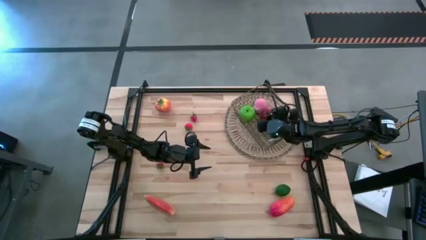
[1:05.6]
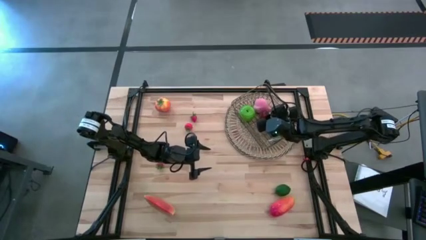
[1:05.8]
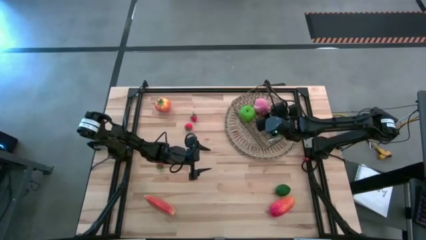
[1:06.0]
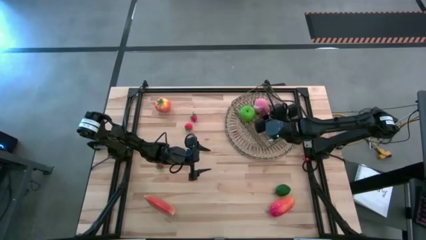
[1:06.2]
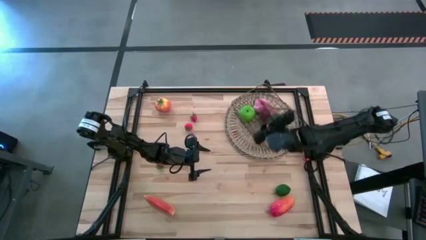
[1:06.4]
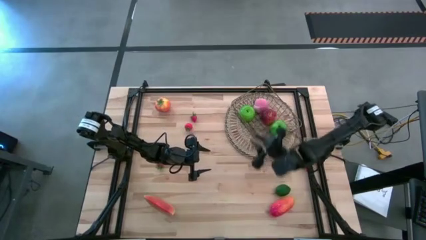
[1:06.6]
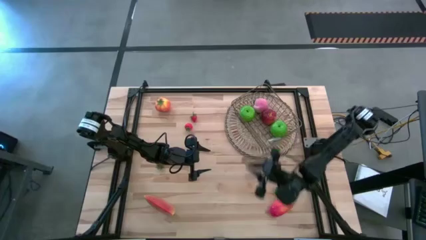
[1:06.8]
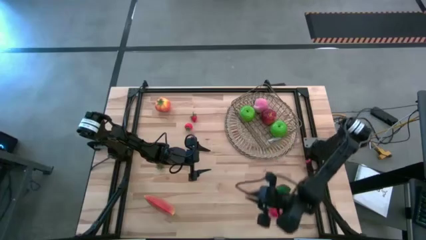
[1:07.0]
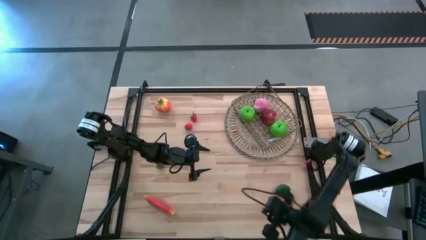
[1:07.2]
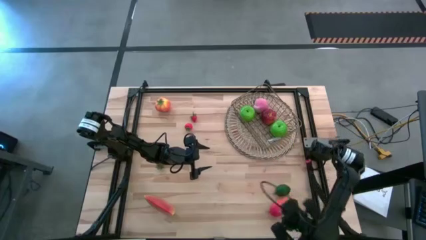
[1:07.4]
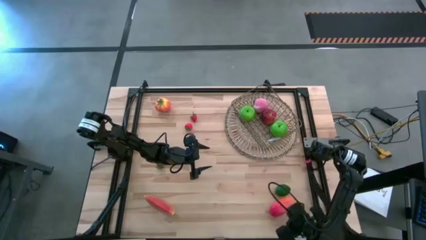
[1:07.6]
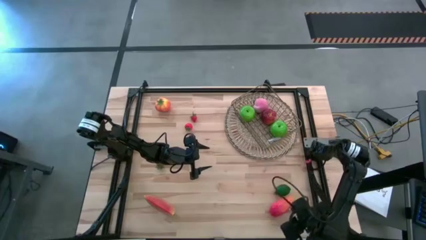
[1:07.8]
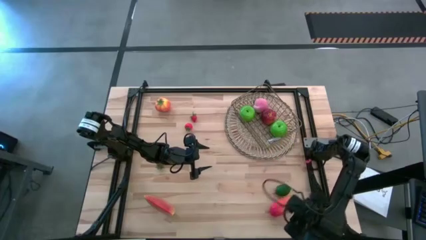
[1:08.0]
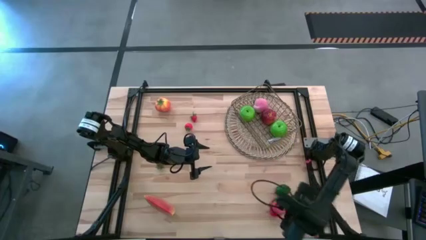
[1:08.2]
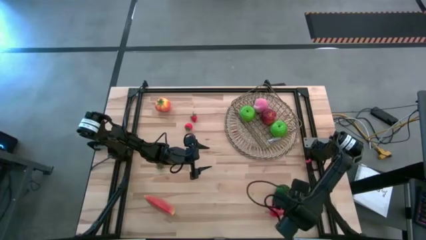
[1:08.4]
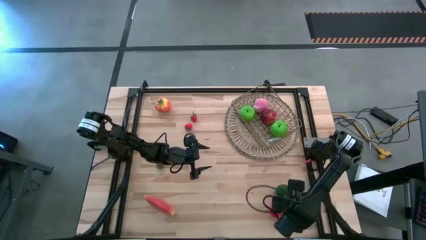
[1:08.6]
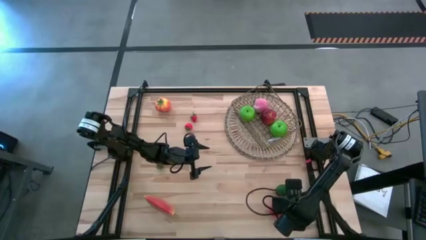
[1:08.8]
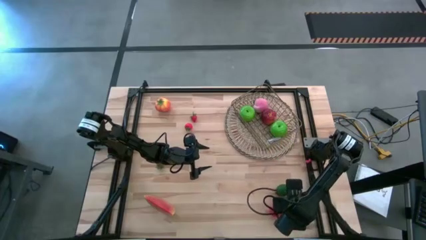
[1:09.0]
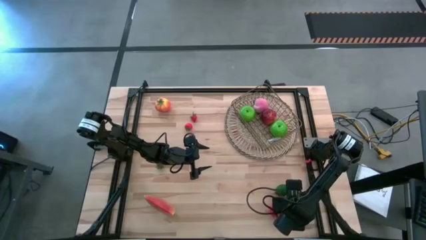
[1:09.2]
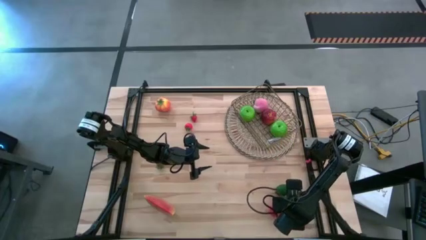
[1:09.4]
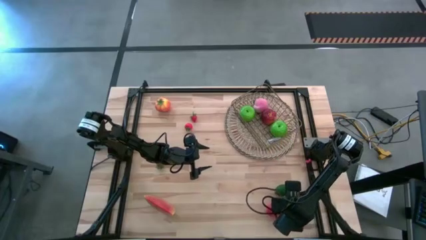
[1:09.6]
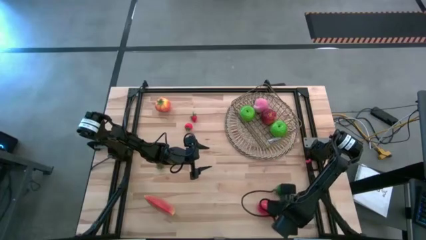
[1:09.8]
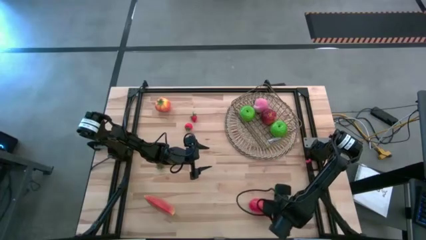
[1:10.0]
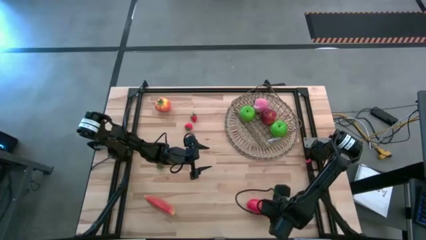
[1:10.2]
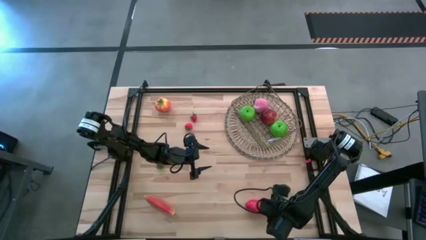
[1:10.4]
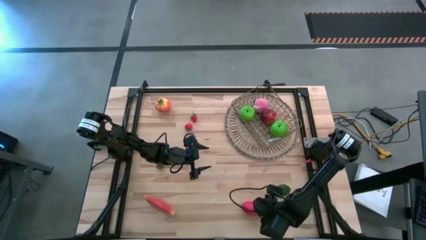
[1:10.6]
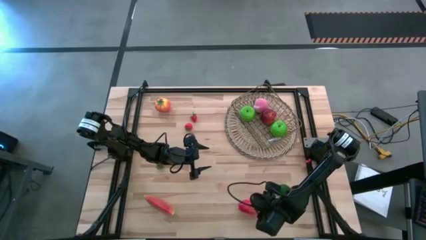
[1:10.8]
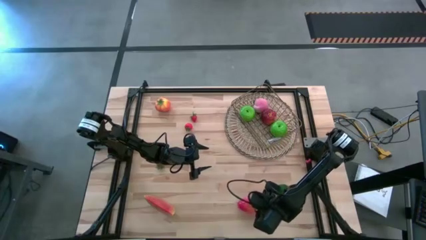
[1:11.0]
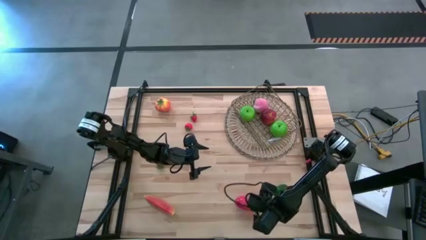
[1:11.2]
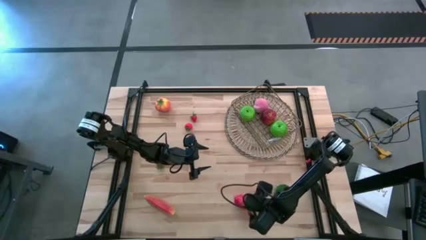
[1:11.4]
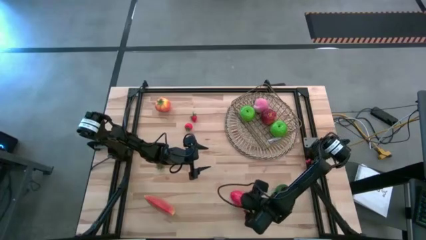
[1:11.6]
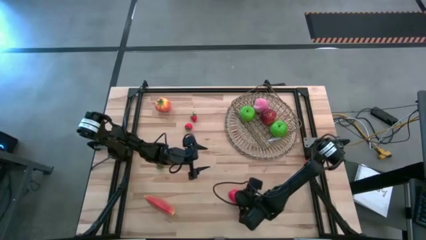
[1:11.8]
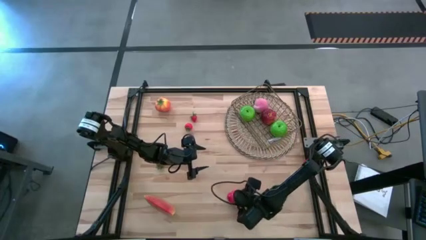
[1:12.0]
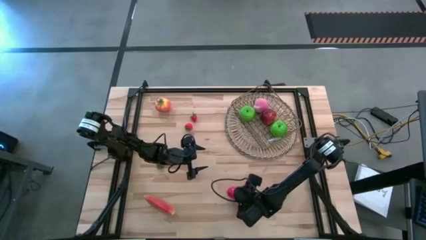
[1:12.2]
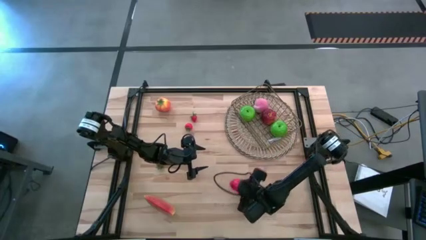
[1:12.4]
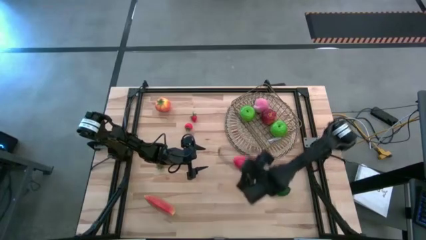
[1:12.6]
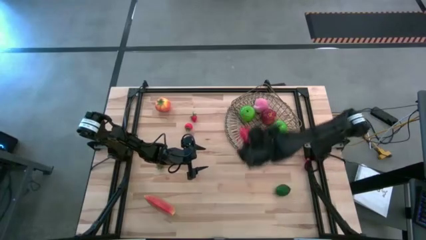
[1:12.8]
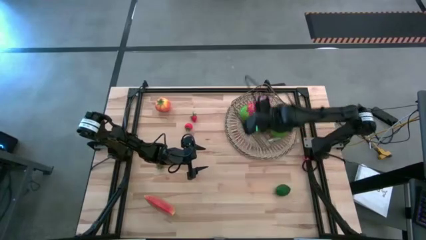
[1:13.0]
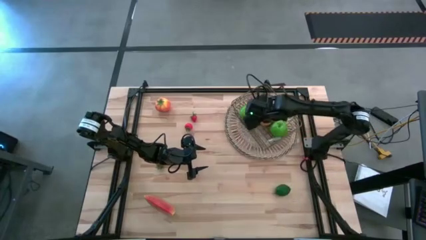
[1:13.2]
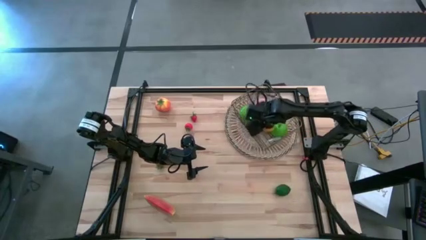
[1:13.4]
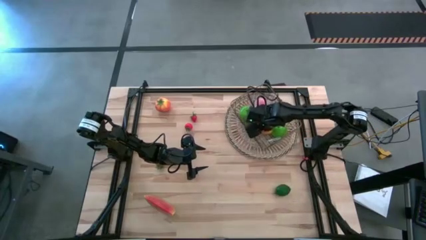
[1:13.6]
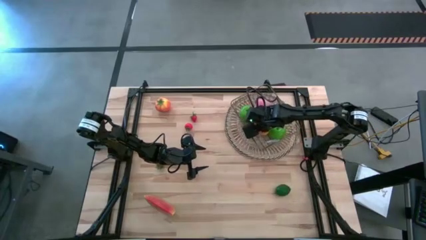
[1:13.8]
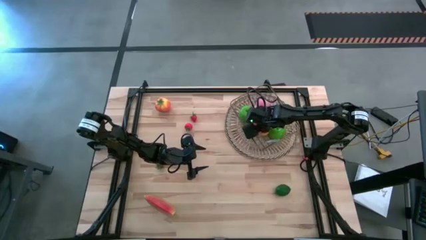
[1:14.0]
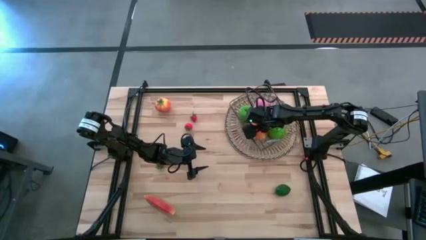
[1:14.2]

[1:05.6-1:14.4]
Task: Build produce basket
Put the mango into the gold wire basket

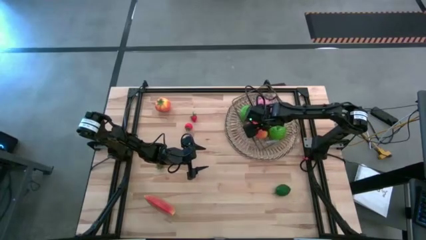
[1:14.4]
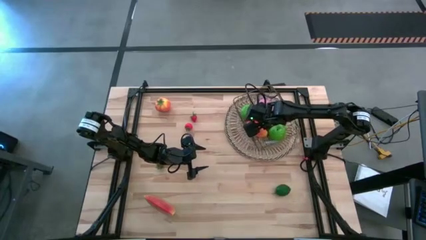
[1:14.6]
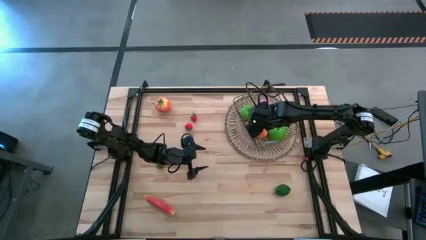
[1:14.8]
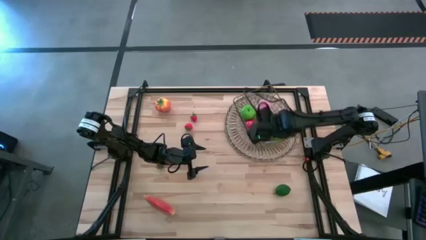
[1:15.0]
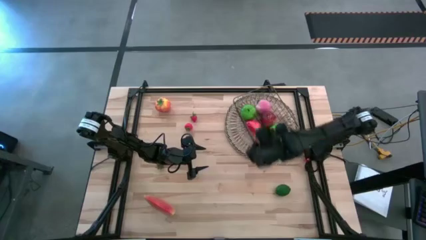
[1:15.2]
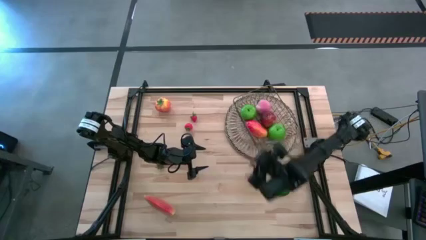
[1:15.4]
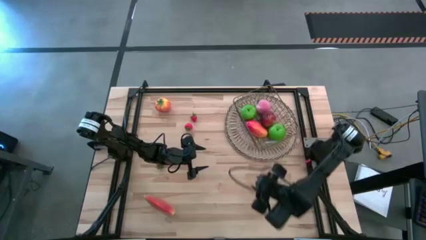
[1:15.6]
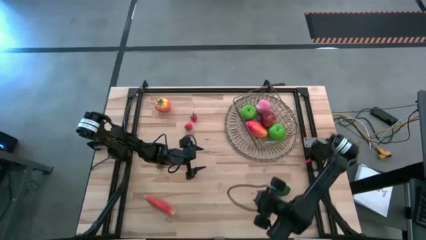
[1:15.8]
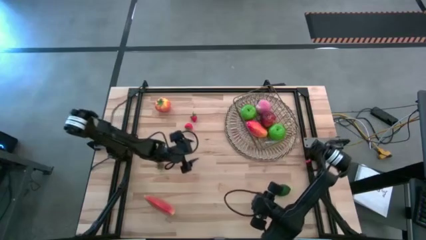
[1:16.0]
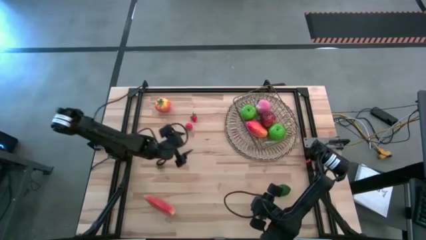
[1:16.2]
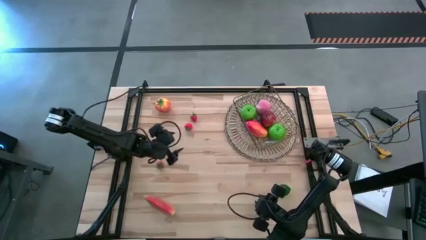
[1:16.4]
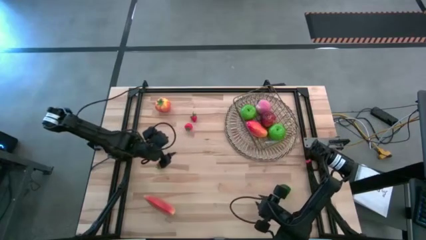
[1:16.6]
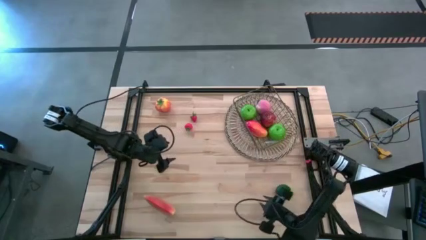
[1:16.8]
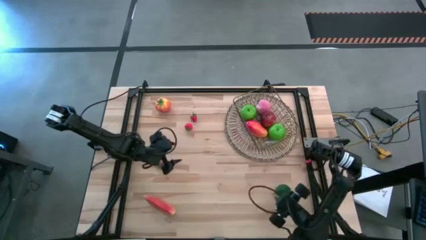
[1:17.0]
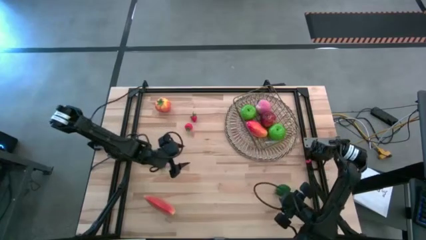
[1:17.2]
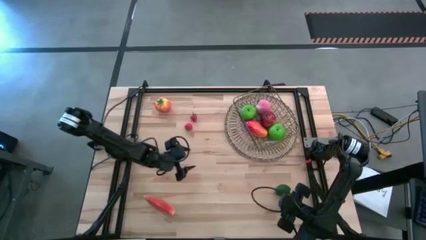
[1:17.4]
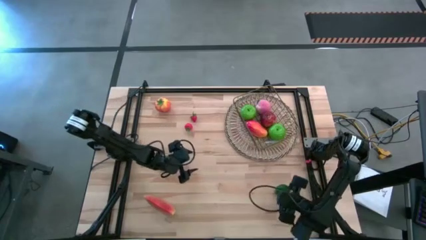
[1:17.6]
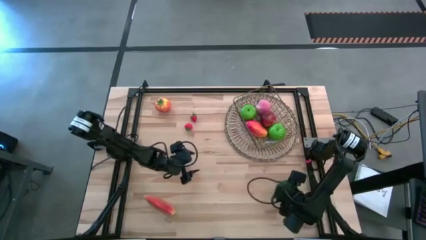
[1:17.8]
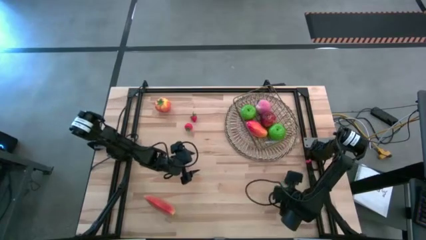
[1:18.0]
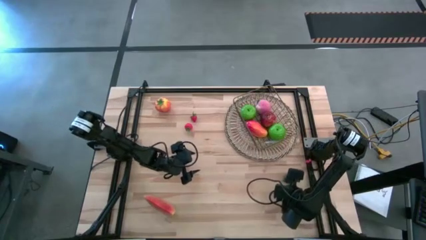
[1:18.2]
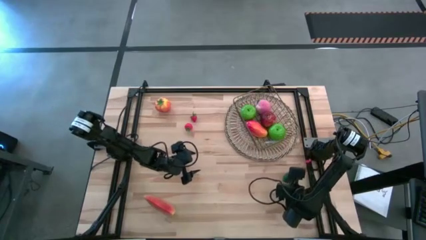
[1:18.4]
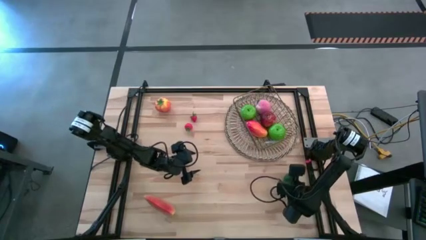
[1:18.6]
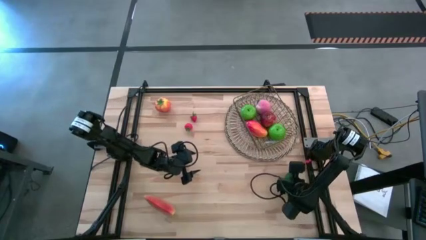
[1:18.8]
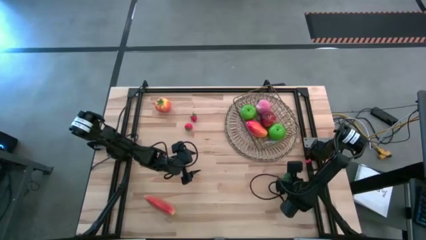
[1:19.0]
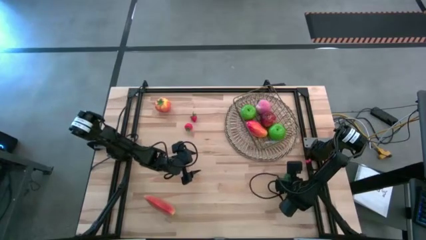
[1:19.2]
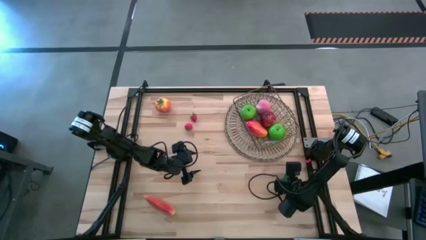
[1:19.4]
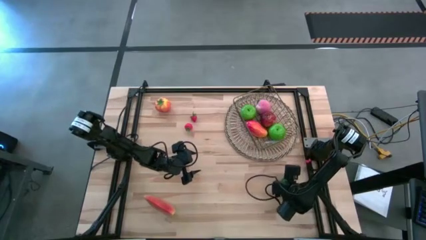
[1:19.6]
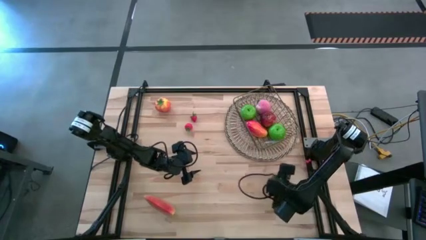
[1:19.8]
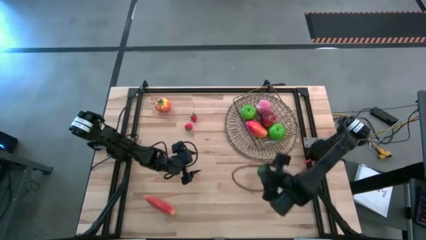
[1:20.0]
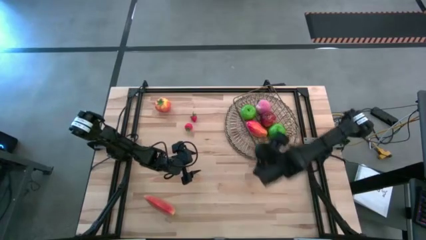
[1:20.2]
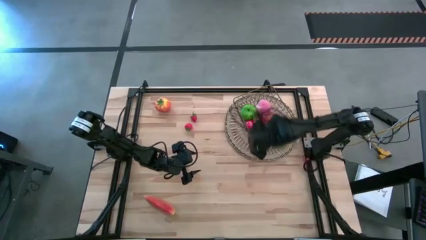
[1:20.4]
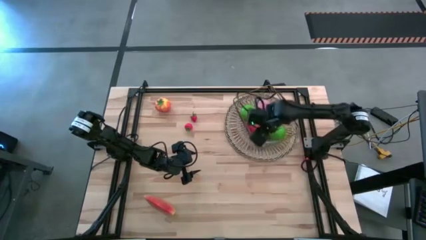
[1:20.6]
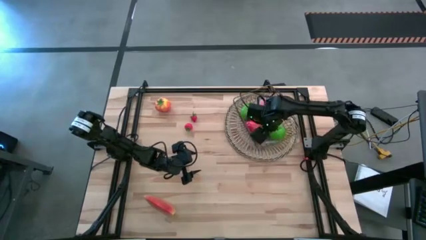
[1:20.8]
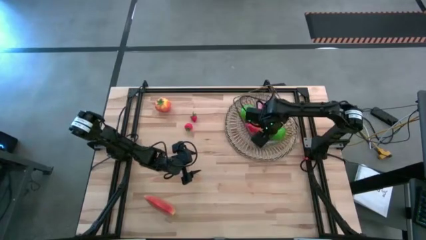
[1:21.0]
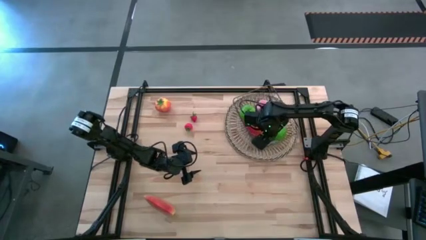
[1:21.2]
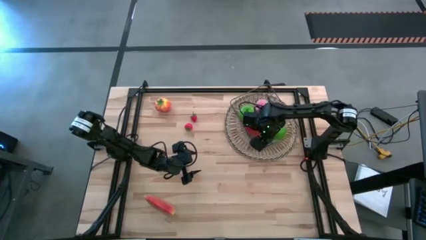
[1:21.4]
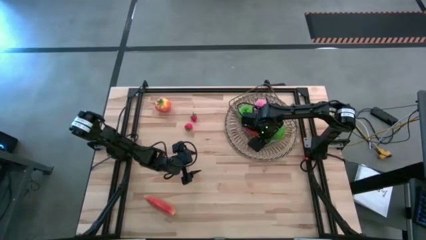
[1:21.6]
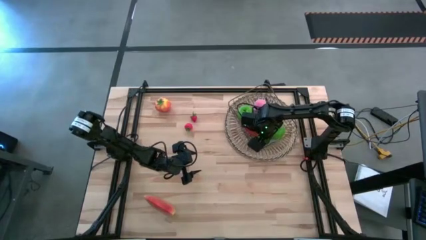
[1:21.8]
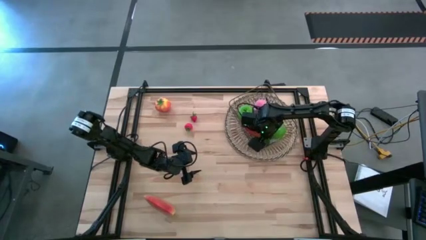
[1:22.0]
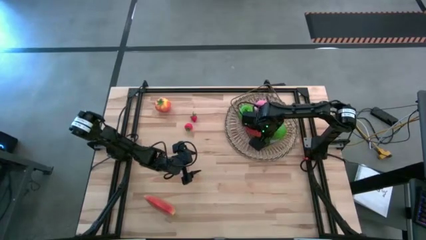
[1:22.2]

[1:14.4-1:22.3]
Put the lime into the gold wire basket
